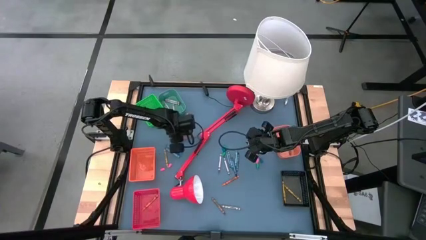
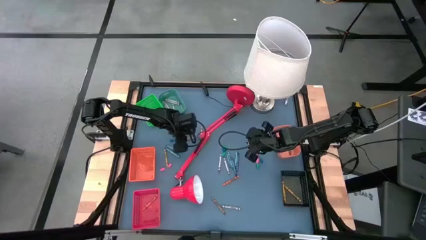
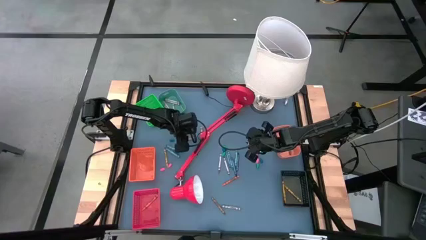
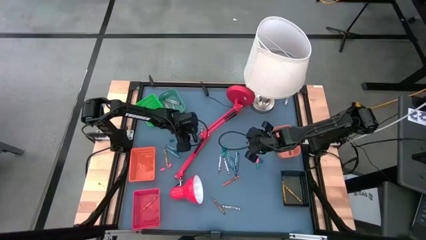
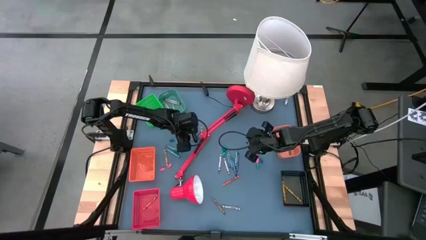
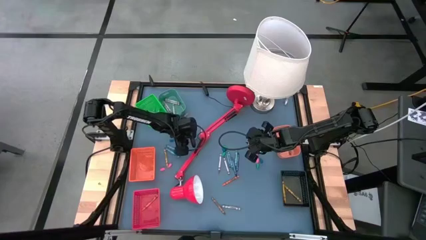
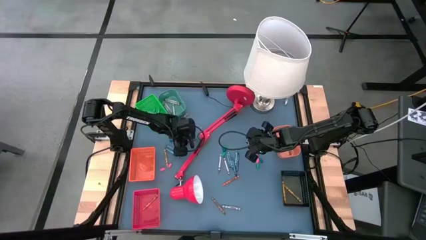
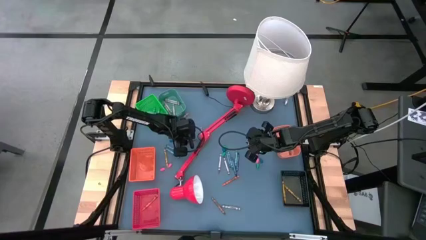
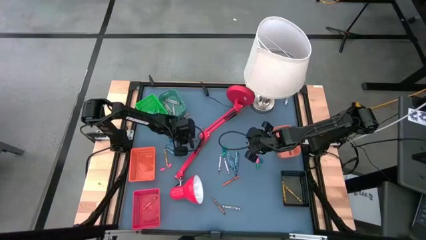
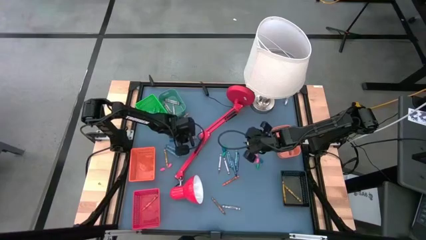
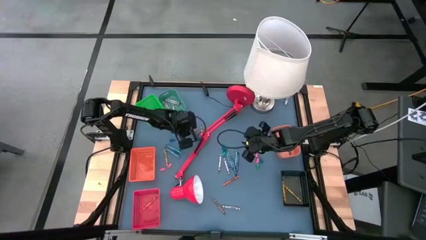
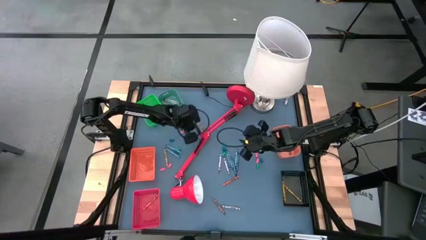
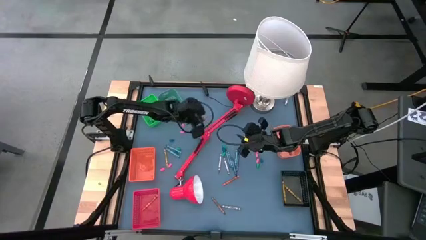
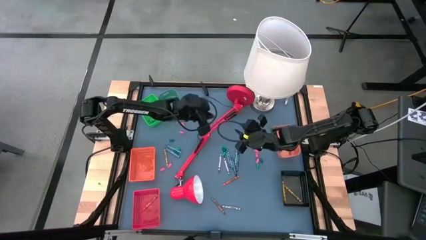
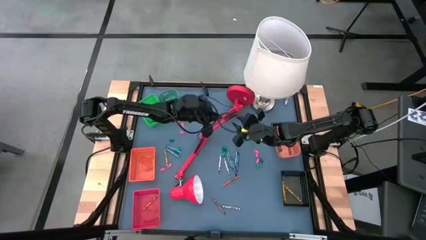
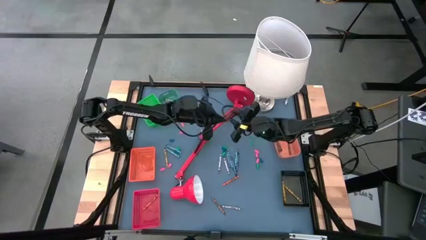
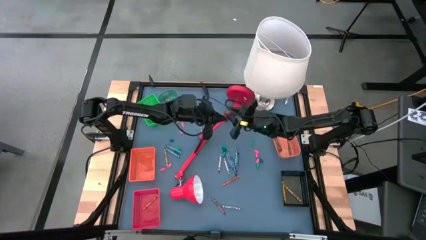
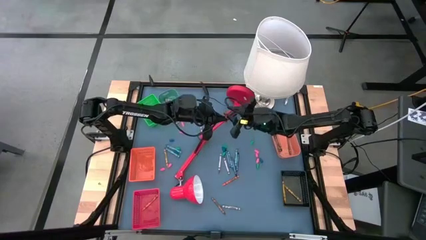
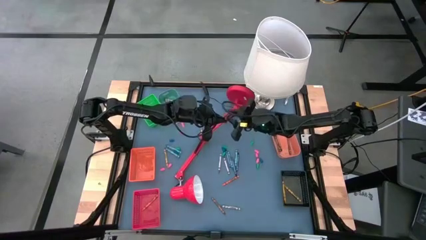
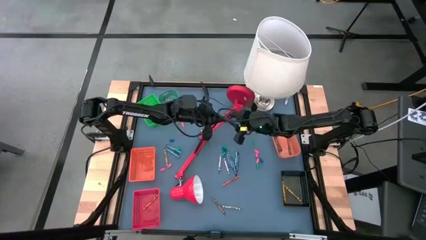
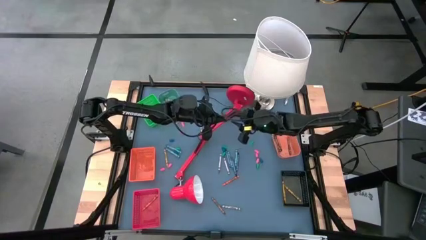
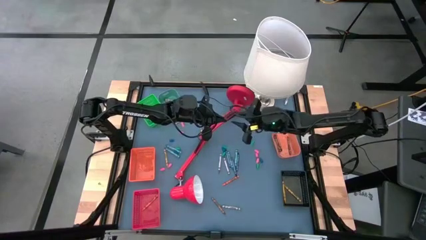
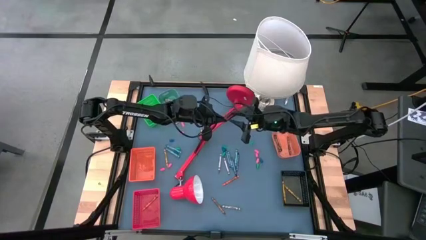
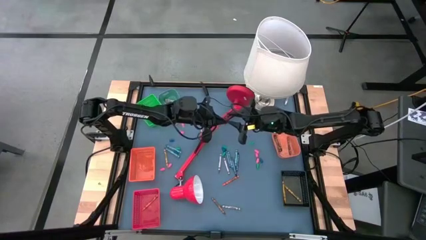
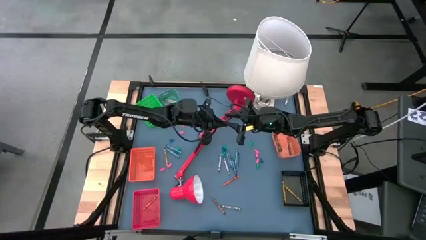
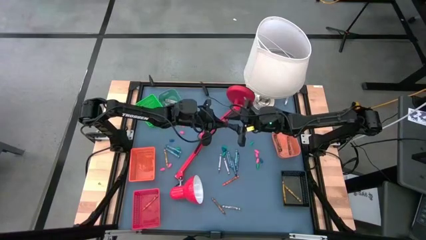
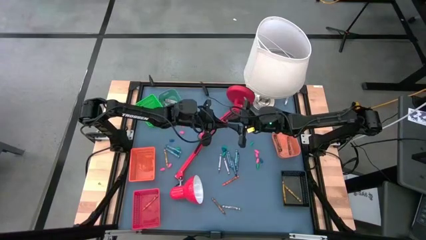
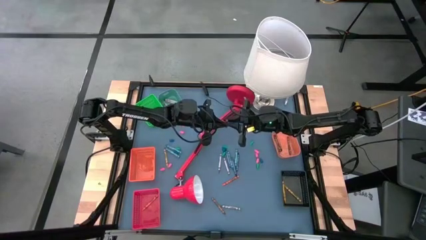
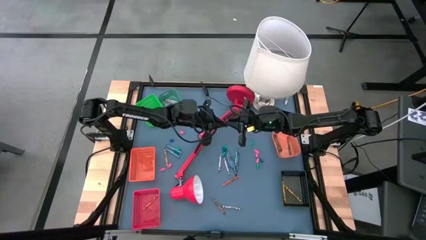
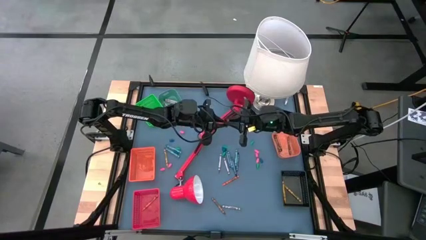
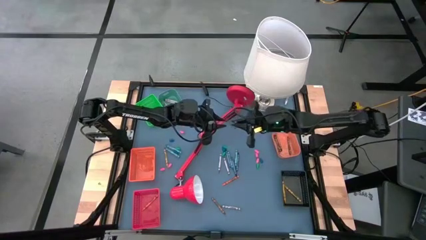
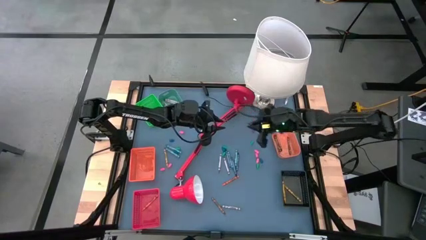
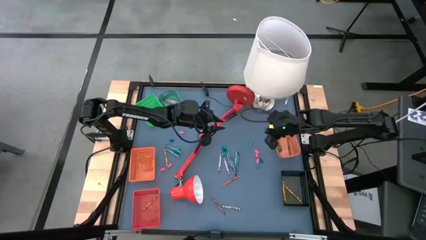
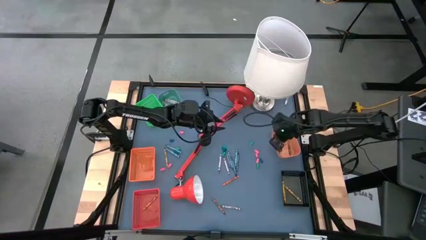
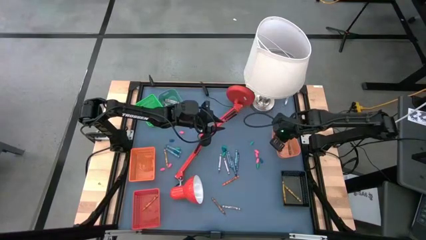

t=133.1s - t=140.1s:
Task: Sort crayons
Put the top brown crayon into the right orange bin

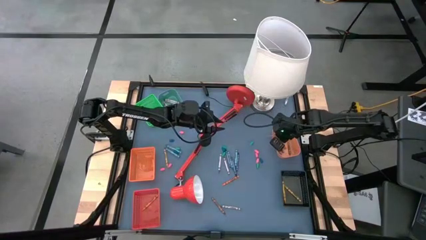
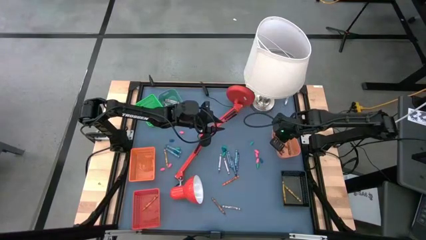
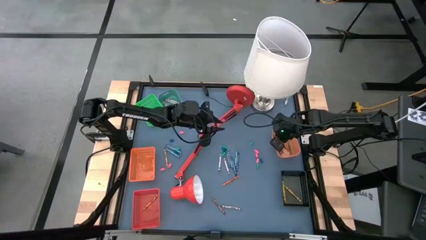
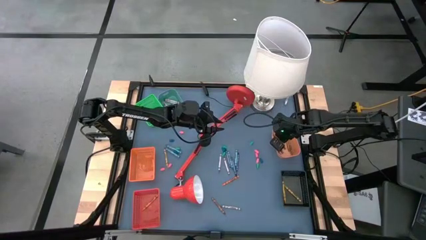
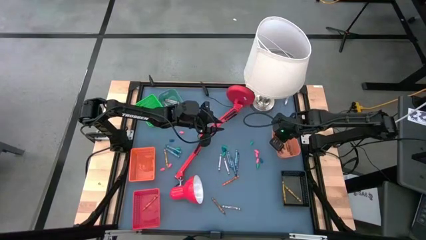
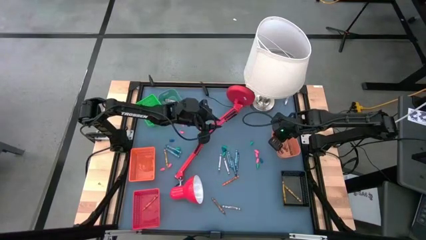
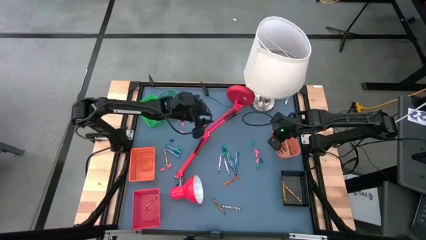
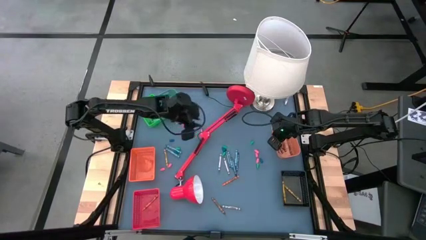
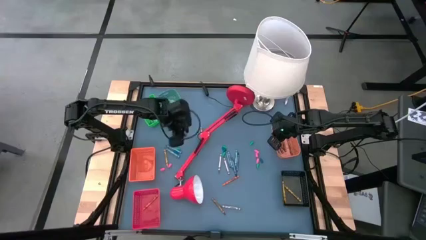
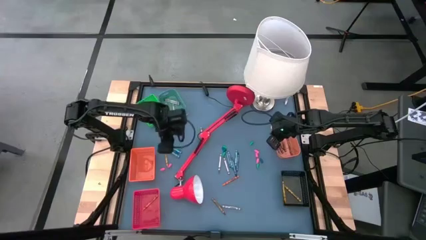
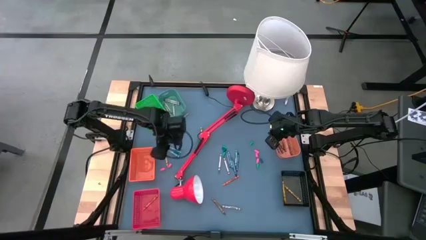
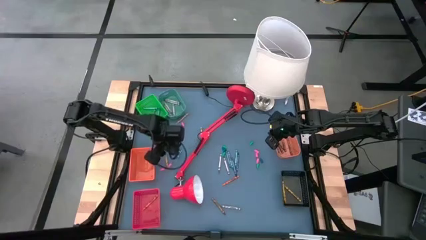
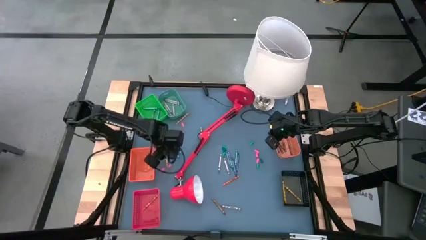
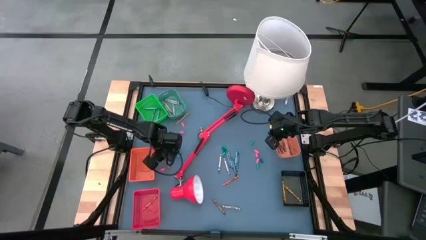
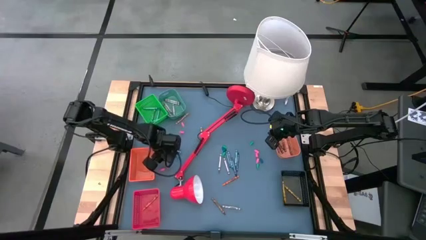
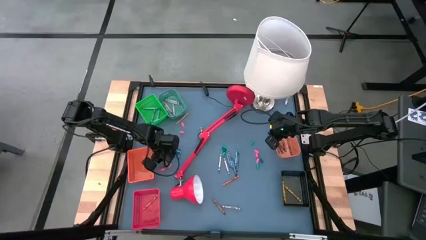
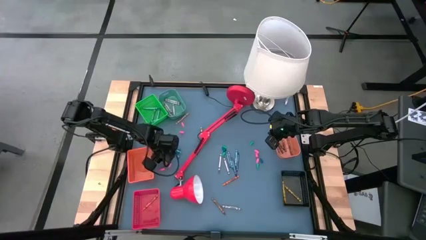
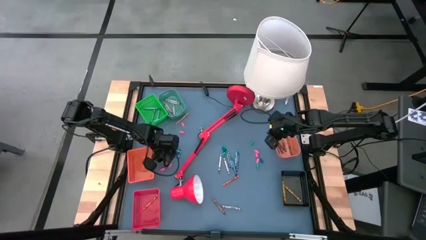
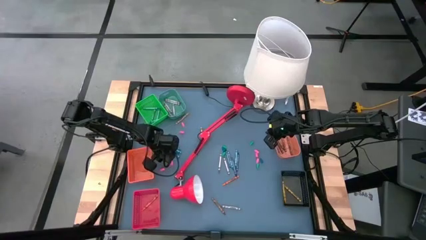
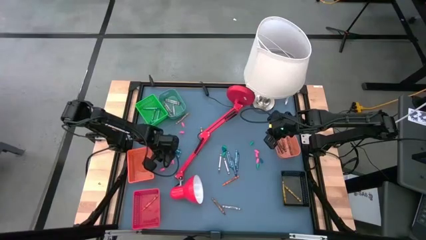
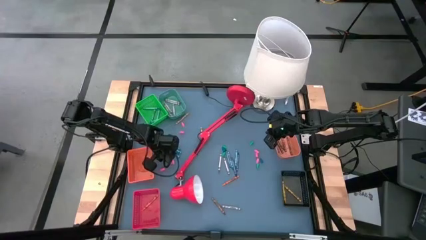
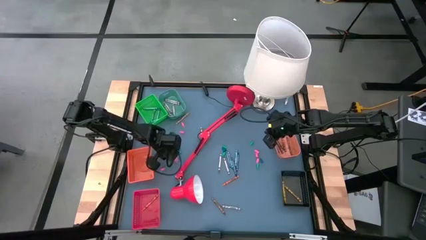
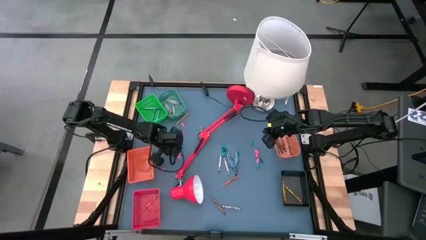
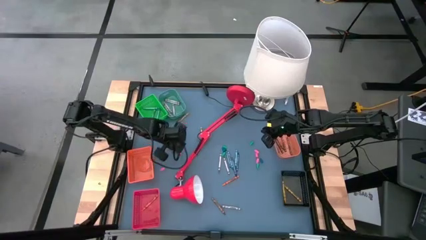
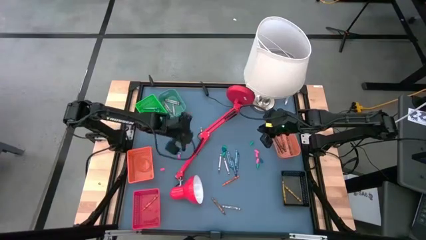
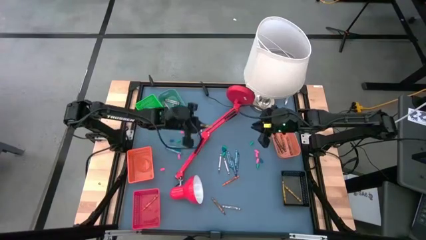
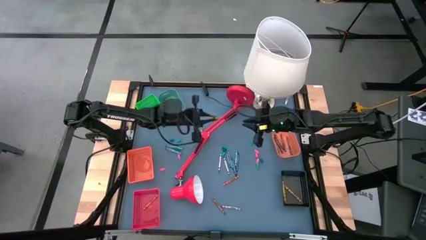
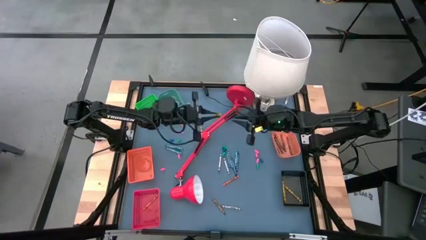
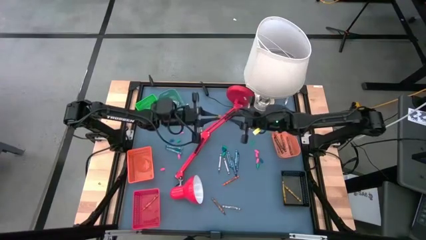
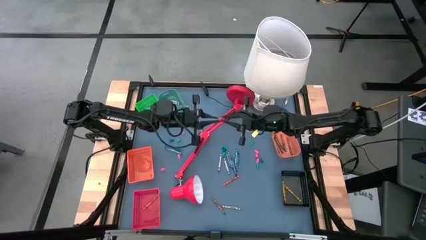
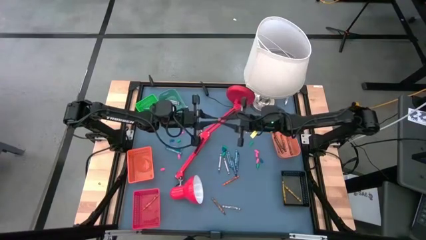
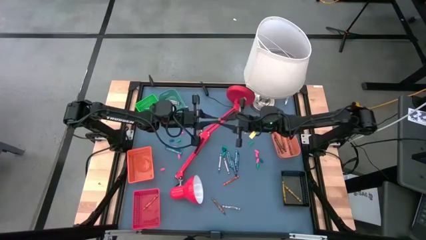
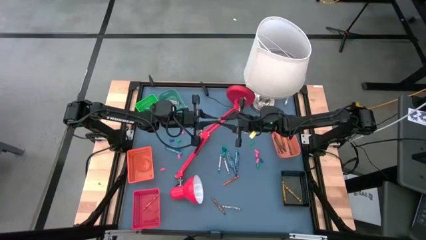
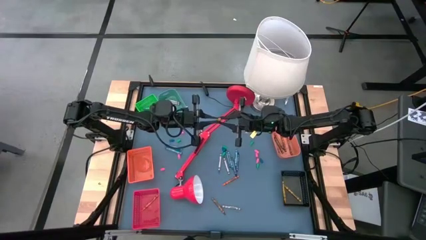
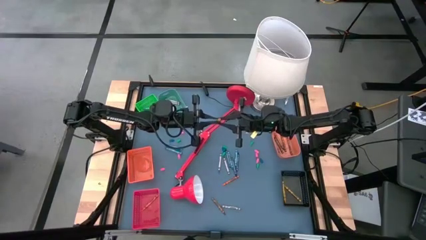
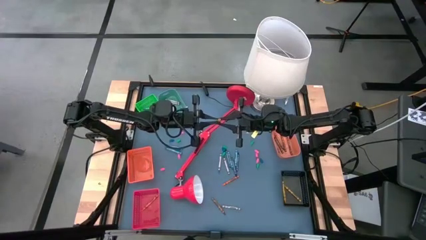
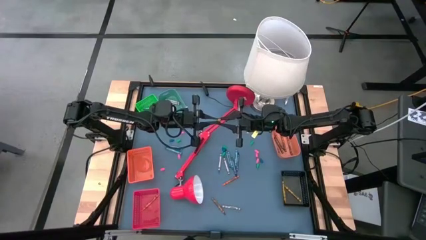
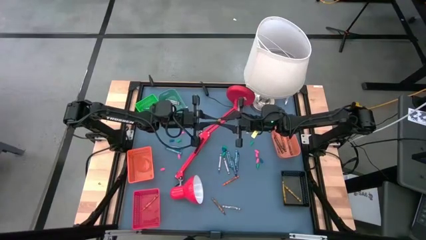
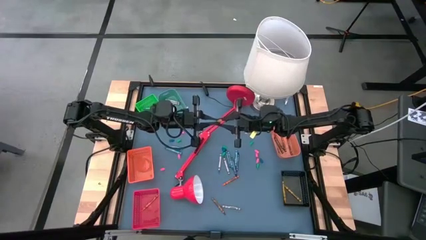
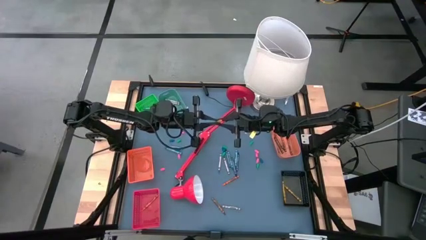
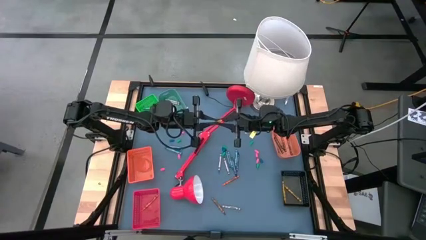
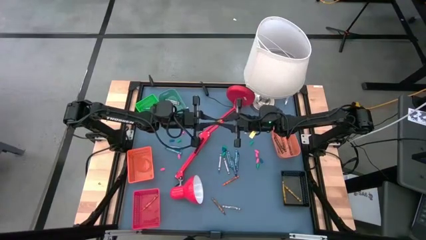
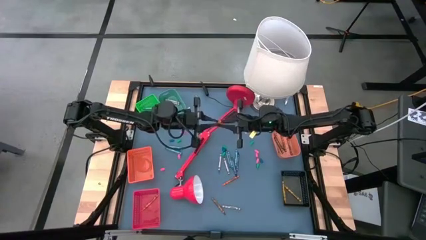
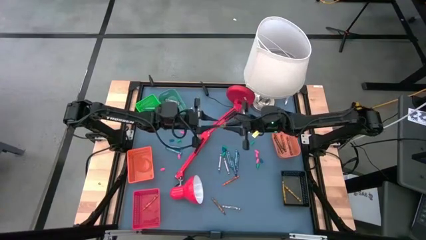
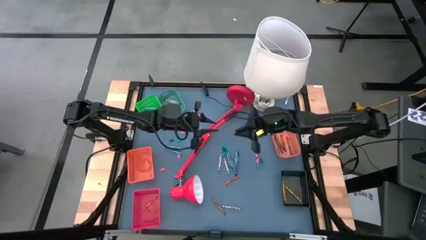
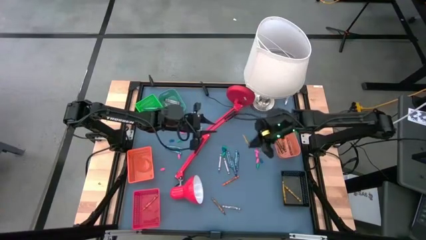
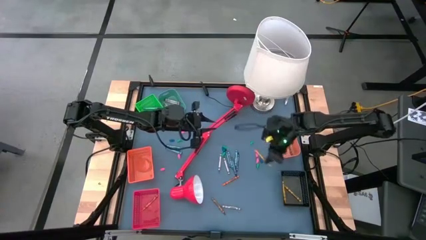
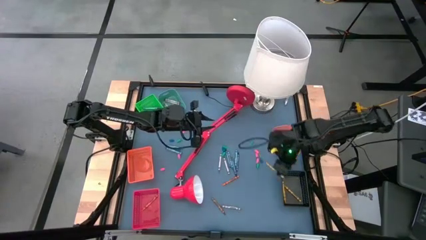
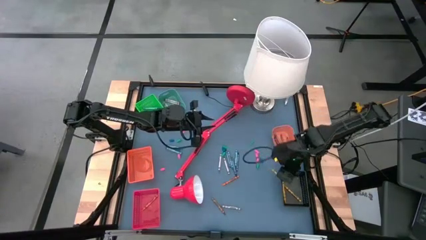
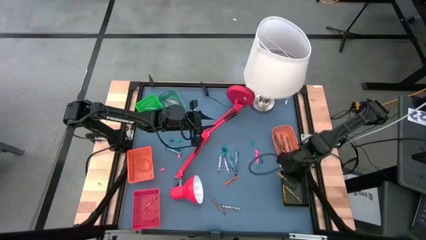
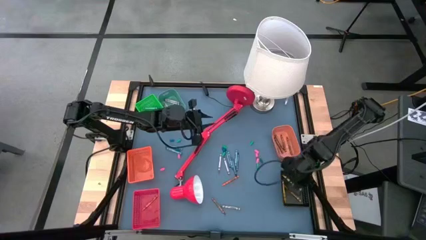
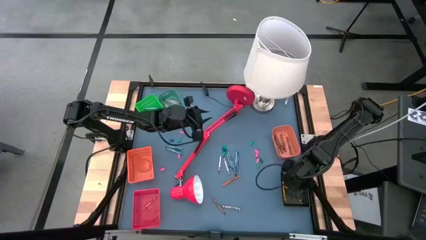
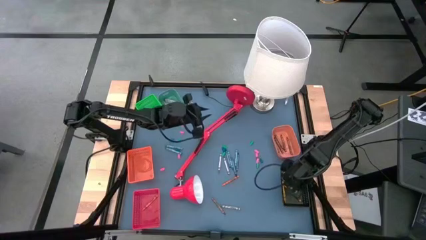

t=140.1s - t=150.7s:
Put the bottom yellow crayon into the black bin
